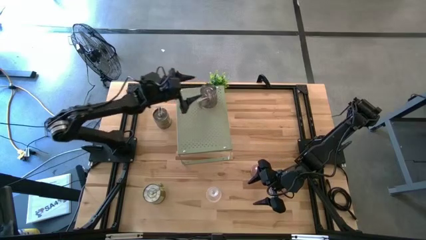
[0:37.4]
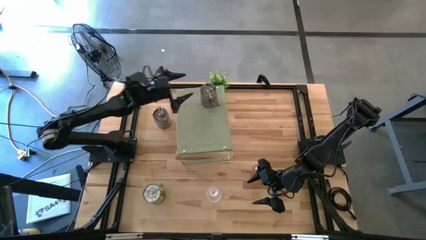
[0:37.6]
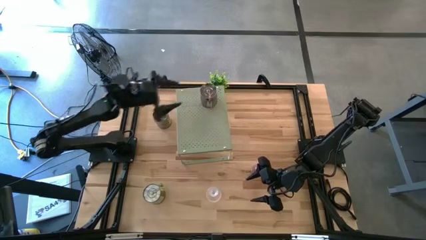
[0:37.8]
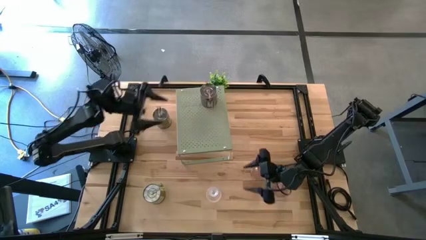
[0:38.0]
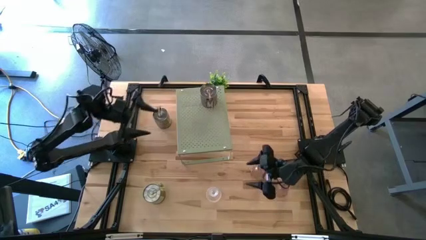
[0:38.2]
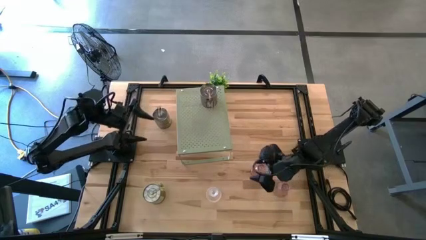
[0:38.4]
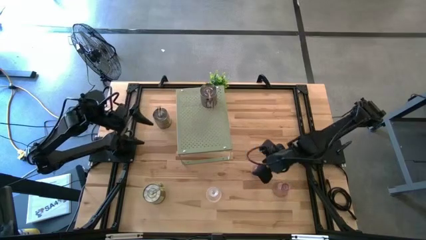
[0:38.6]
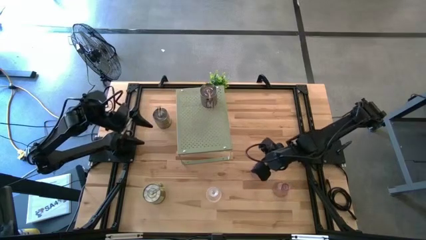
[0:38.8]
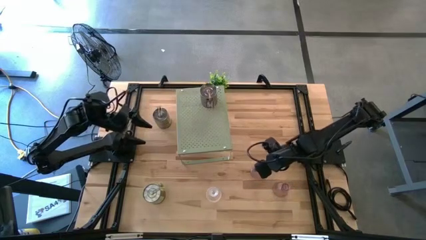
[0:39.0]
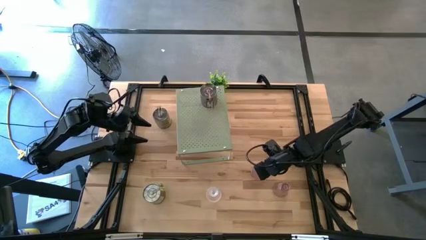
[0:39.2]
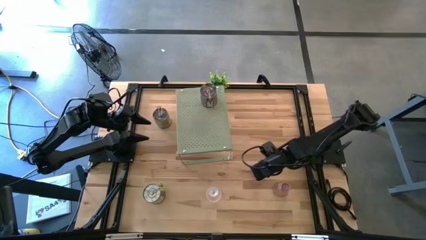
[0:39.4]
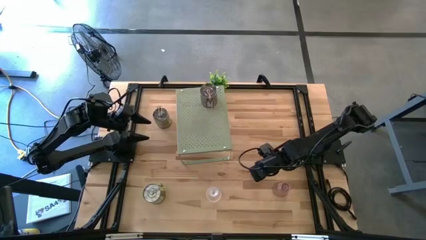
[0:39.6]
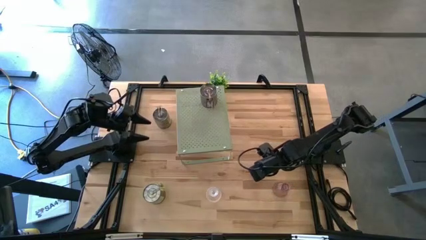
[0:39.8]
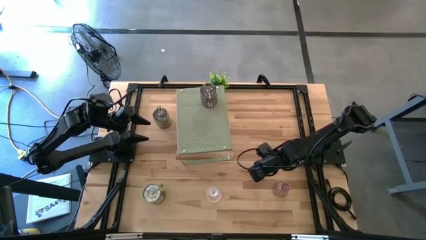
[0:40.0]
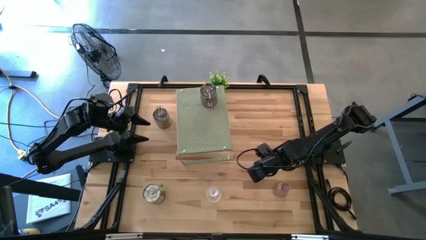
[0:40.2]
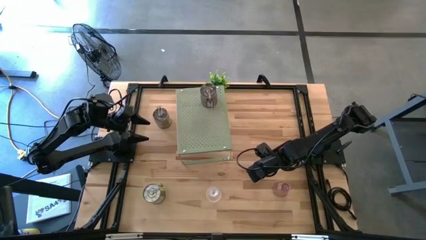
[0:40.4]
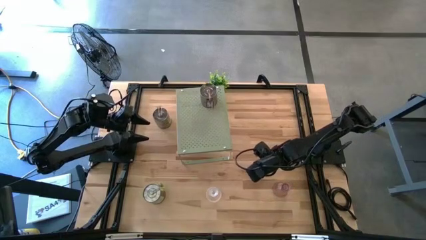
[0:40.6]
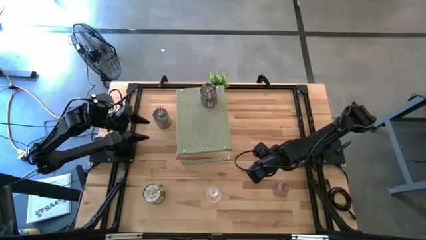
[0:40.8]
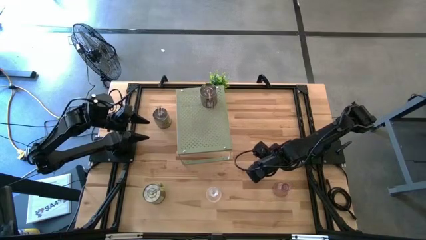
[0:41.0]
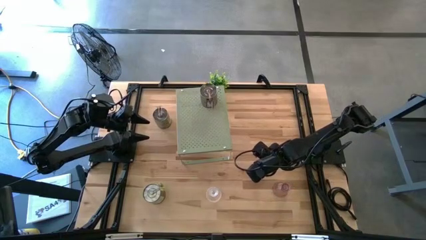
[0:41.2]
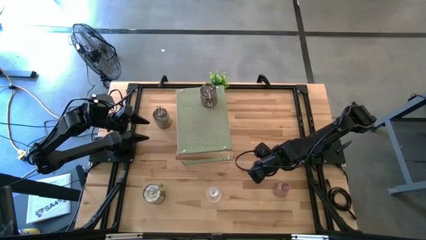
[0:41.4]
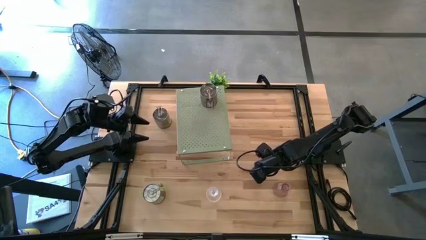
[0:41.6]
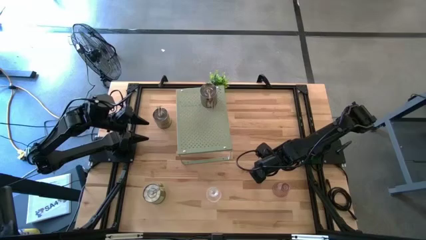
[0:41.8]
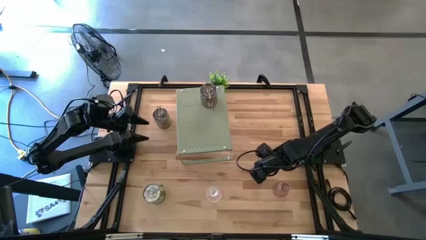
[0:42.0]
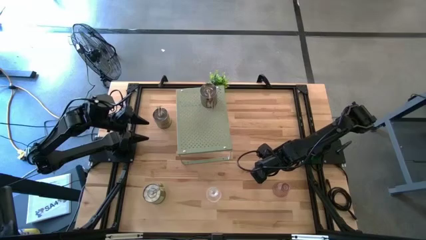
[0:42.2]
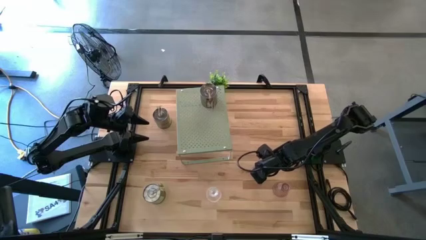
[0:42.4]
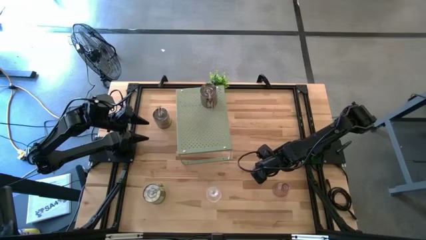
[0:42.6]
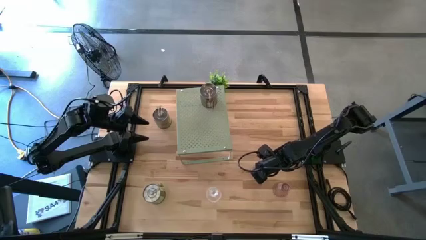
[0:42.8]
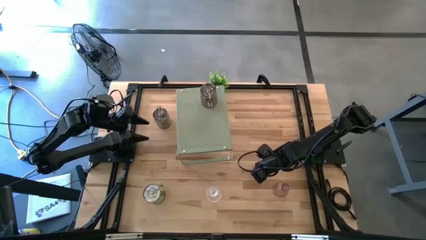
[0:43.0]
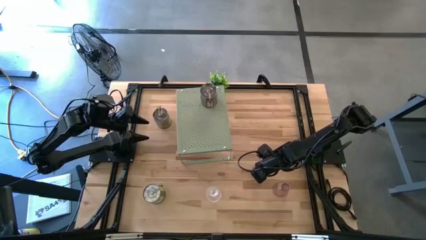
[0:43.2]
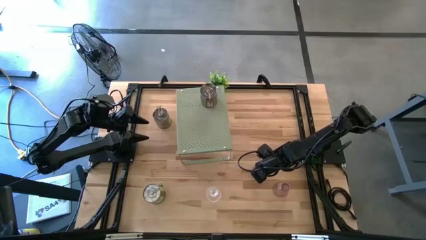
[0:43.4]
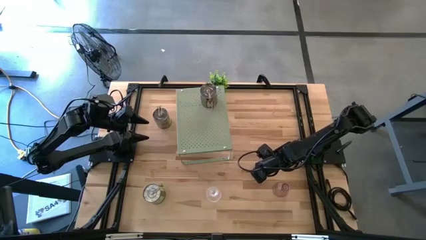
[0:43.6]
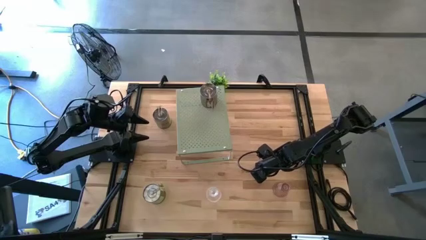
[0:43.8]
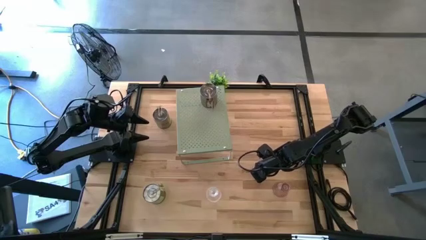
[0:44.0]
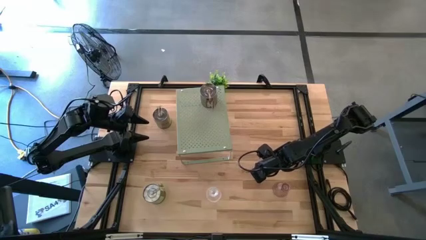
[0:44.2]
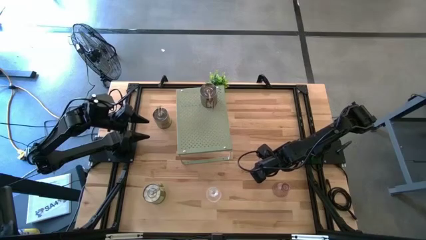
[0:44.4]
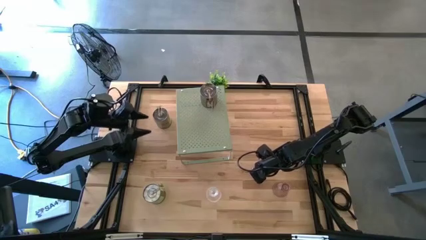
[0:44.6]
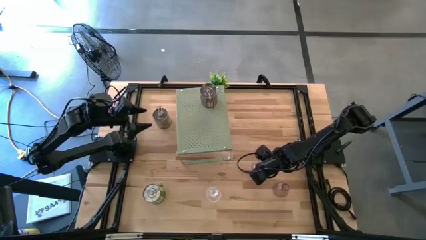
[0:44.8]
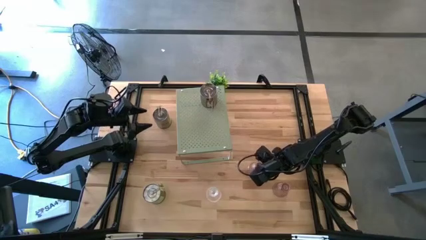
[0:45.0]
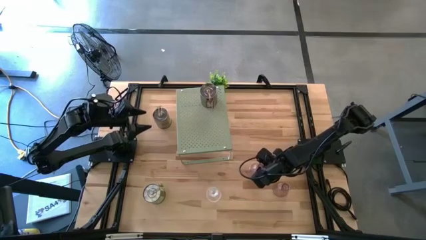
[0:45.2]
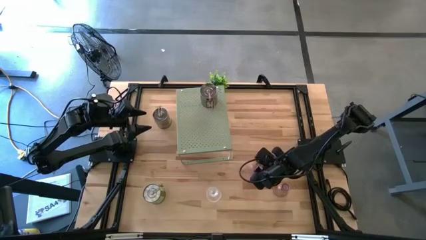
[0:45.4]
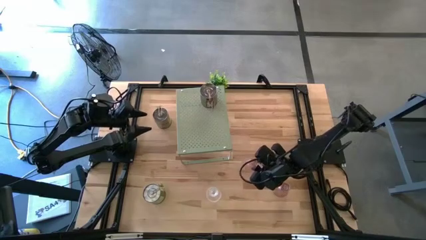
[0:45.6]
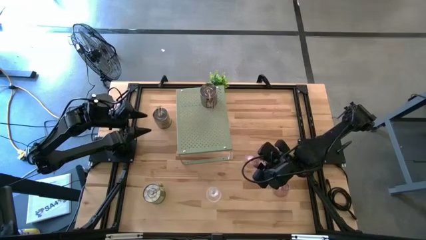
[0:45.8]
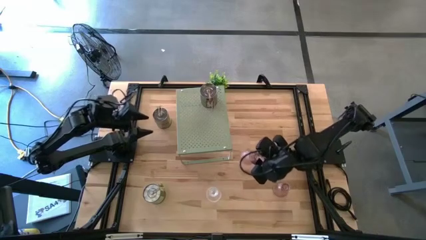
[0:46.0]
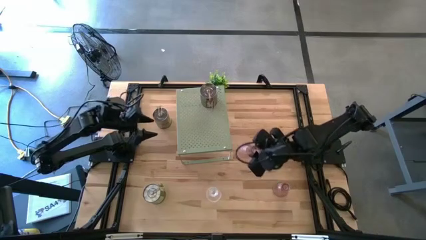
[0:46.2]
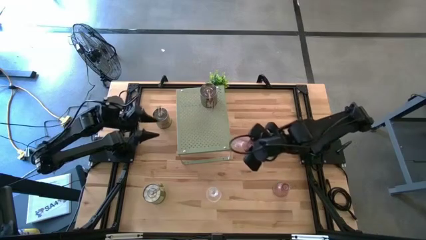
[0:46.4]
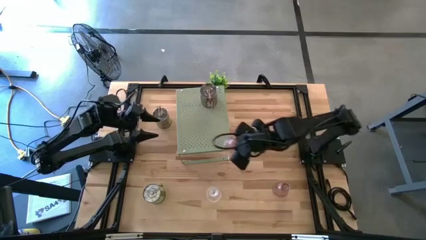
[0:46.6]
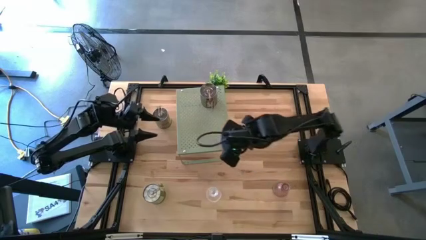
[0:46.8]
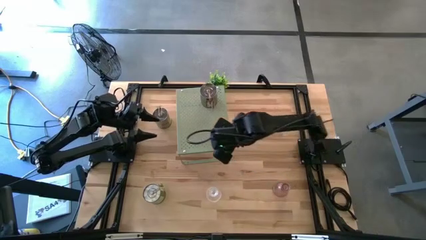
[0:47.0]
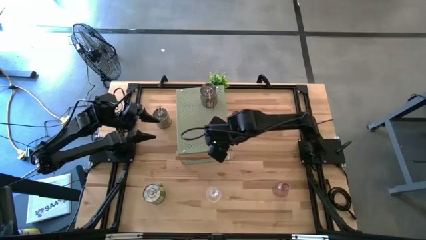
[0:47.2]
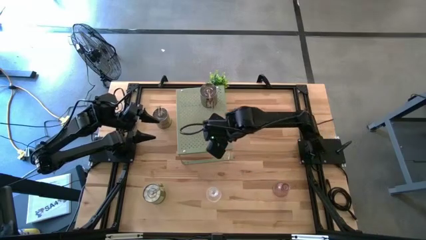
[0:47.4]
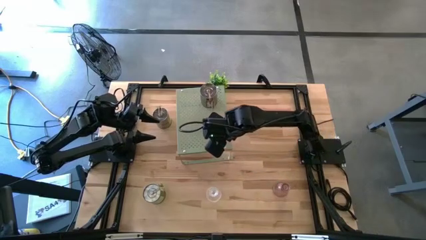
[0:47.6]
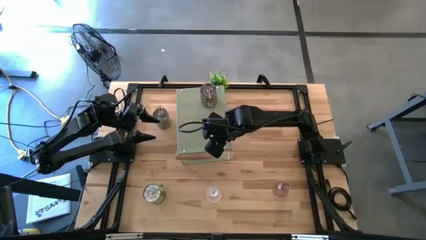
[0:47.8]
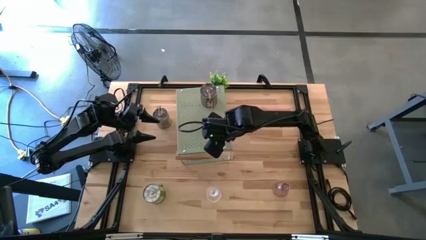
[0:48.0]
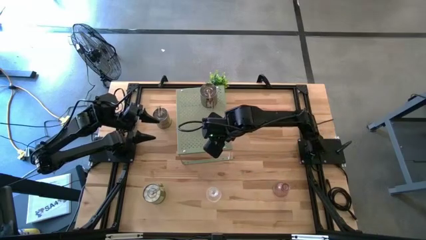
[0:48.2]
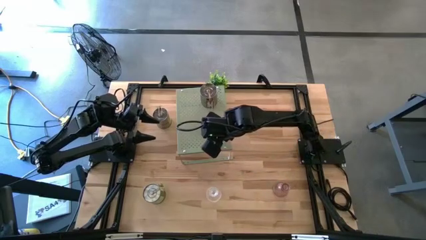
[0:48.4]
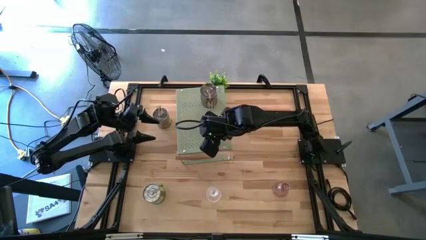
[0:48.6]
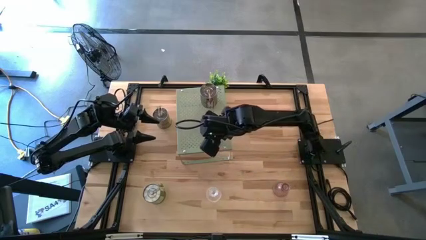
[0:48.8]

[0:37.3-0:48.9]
Task: Pick & Place candle stick holders
Put the top pink candle holder on the shelf

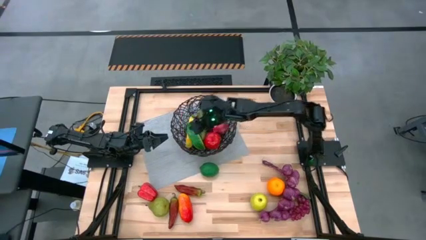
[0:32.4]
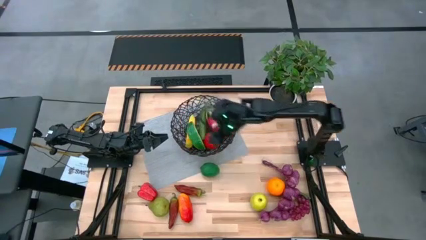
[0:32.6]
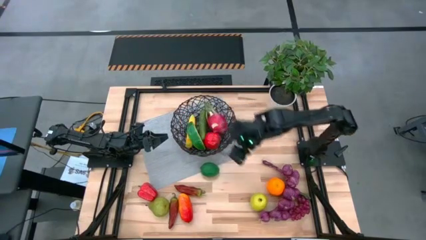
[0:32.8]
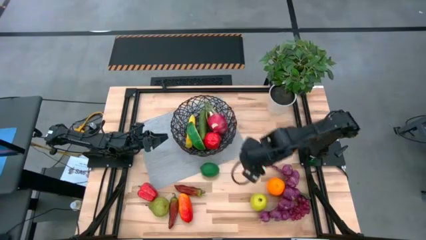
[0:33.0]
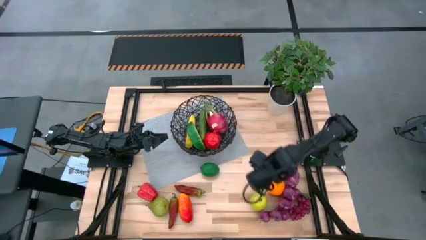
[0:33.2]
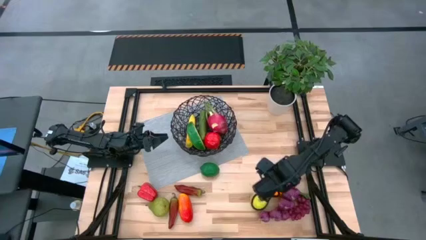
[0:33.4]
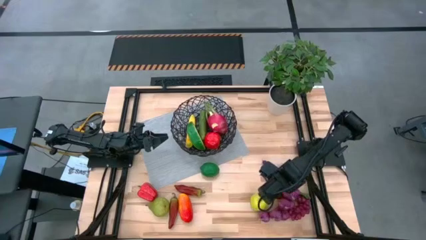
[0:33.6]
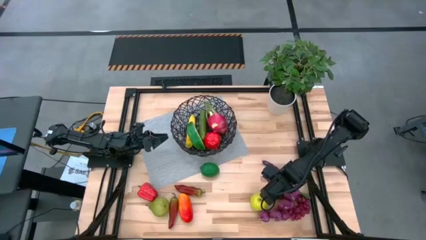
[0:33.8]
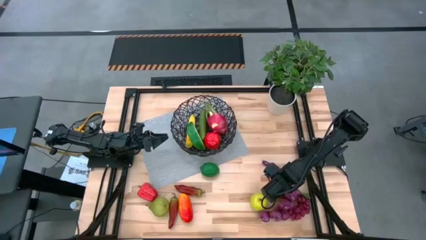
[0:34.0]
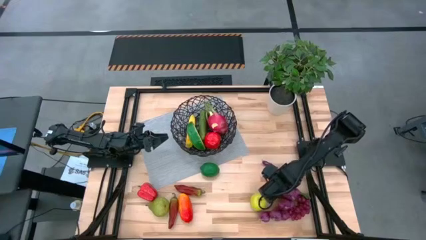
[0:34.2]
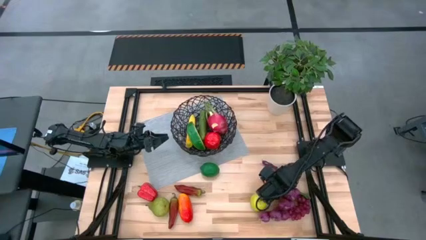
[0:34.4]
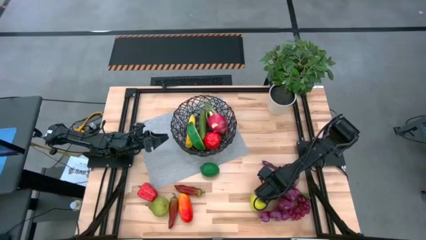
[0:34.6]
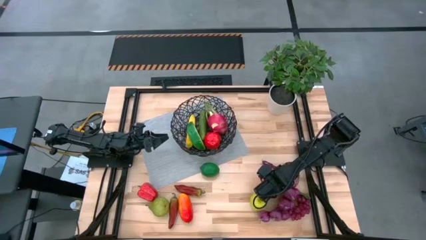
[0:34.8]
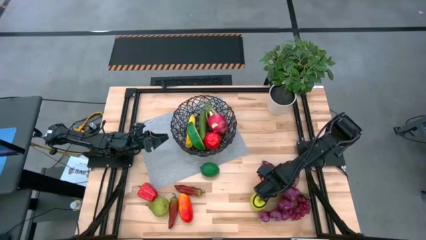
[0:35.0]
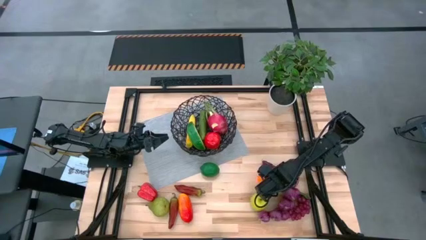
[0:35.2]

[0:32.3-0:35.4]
Task: Build produce basket
Put the orange into the wired basket
